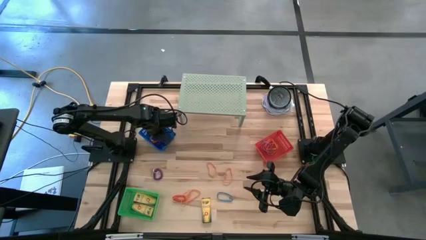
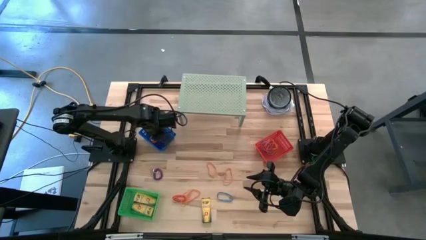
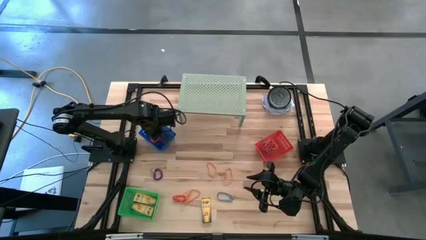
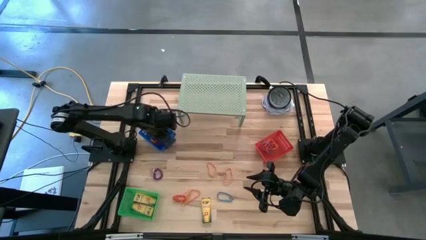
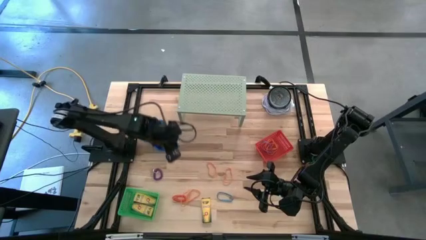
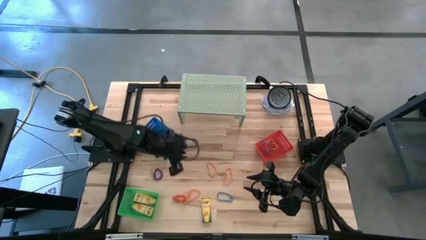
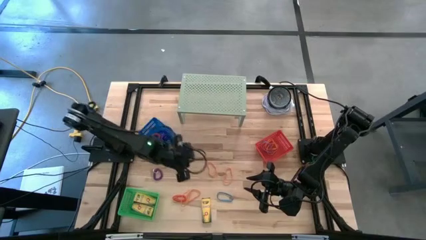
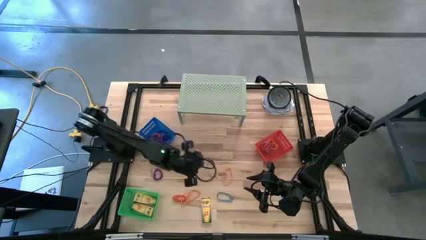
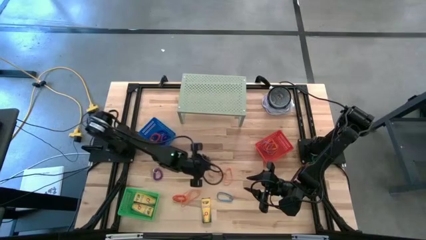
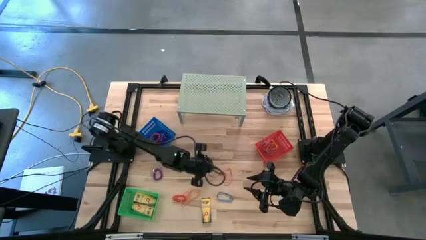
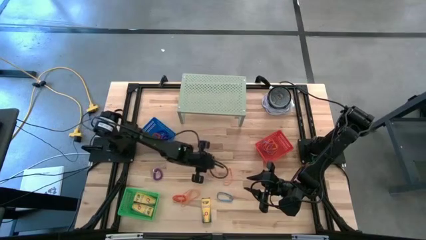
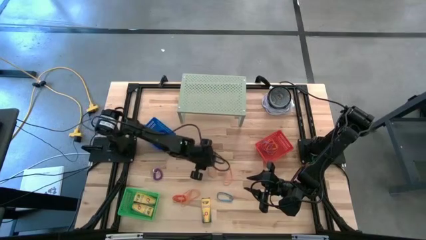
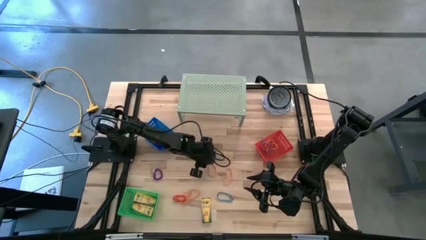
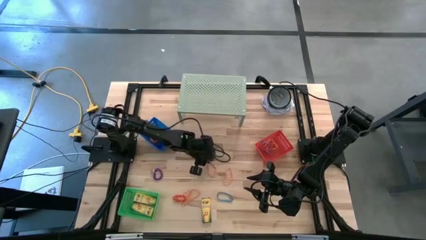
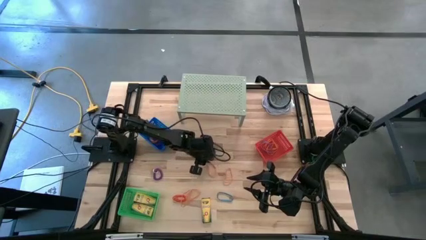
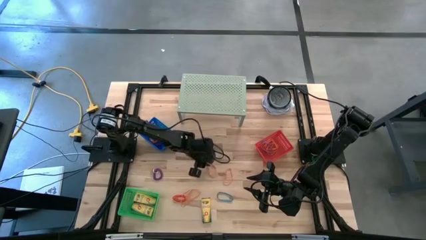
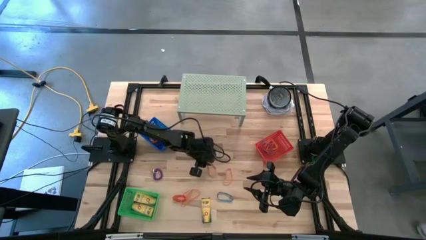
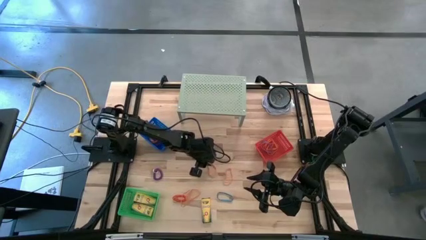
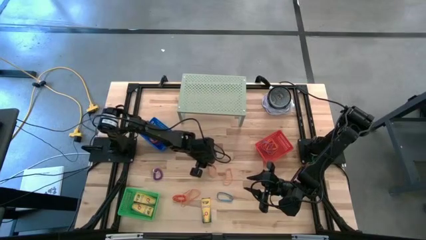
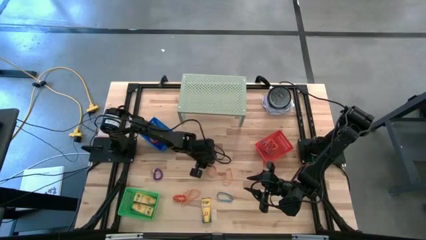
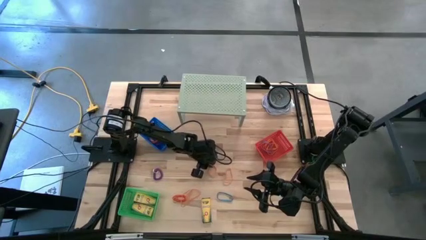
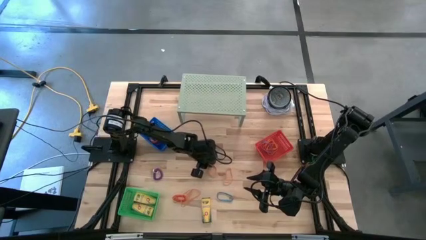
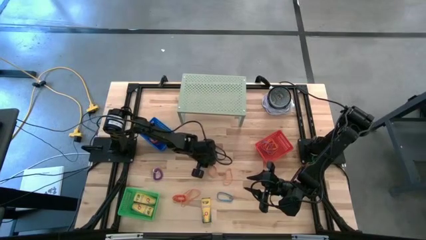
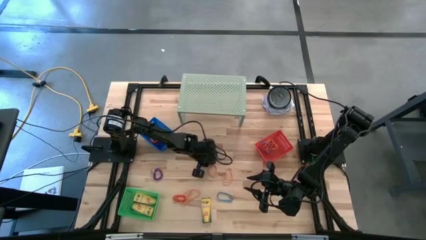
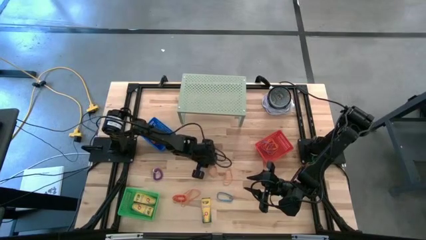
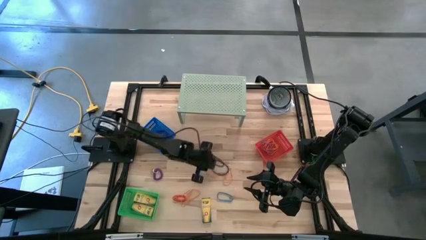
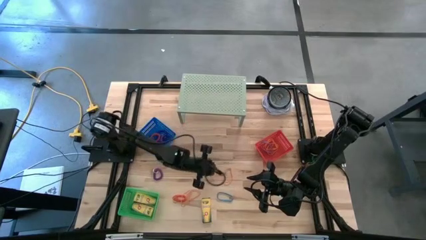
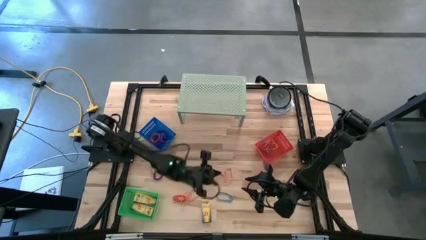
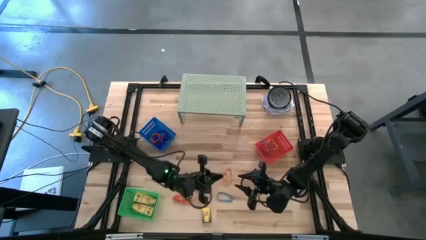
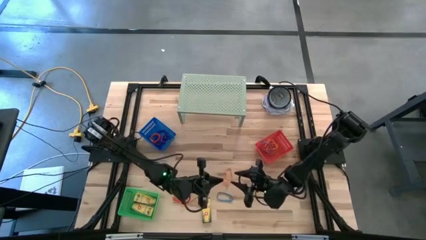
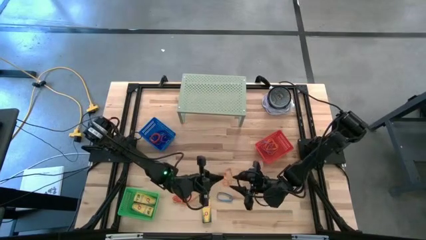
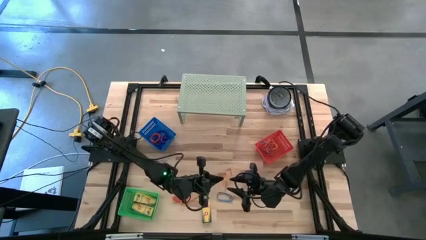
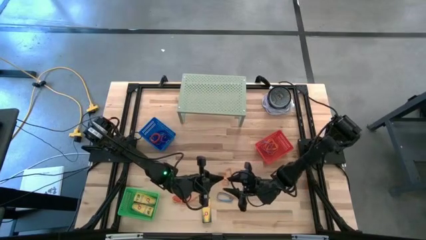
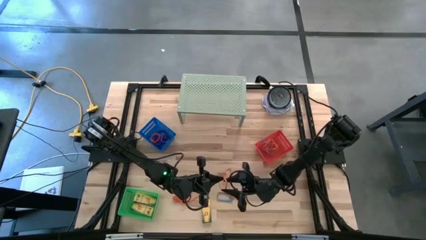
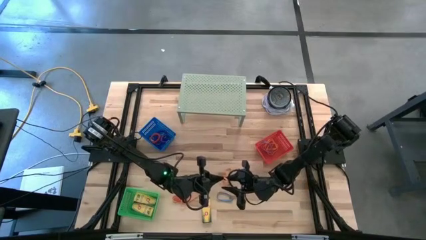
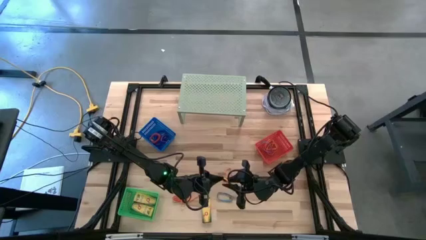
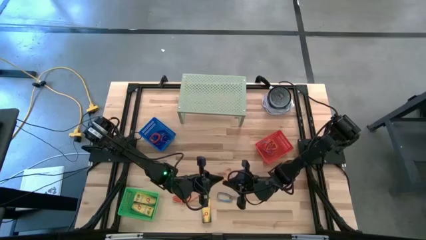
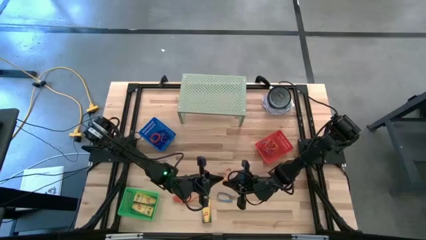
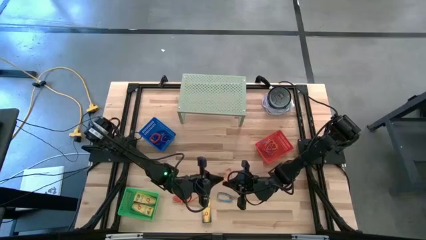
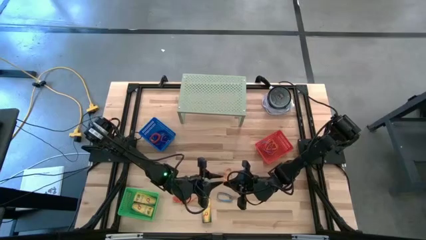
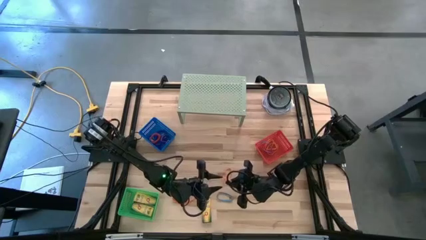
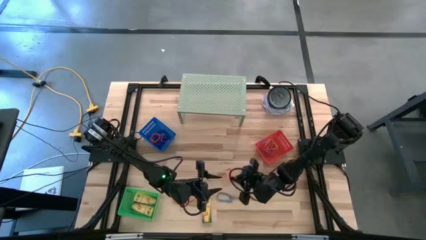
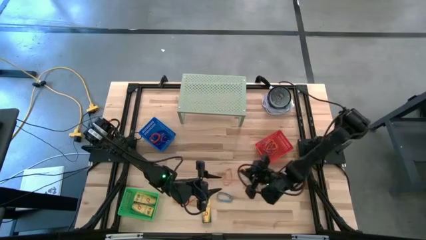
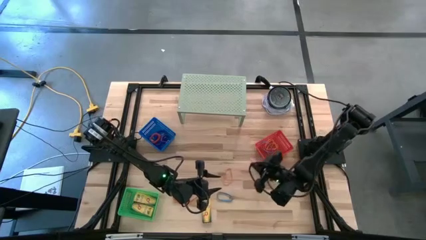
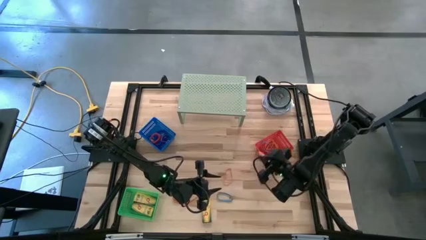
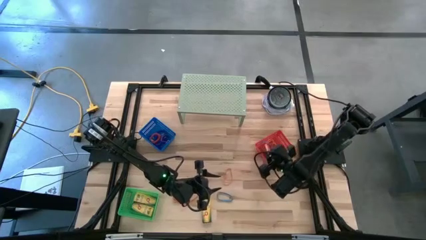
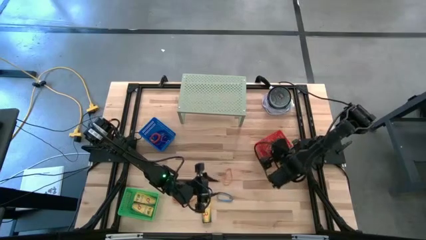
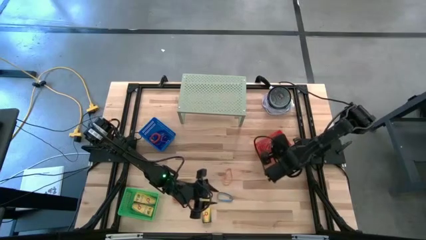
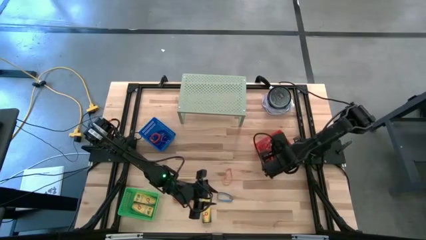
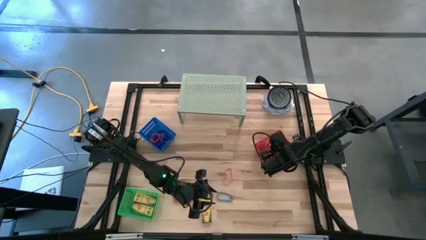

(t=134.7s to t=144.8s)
Task: Pick & Place Office Desk Supplies
Put the orange rubberband into the red bin

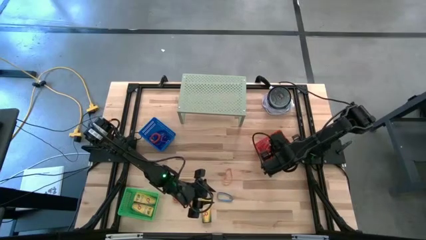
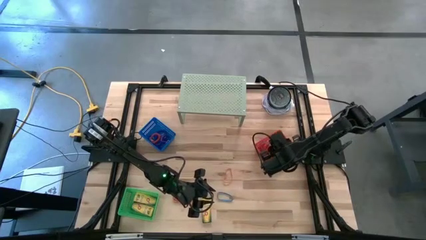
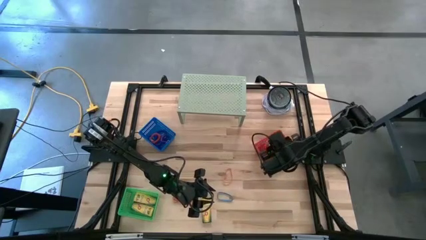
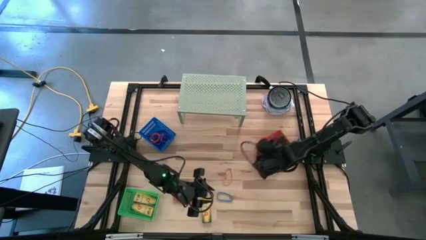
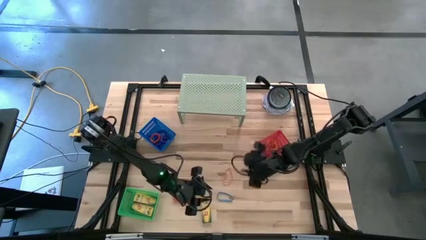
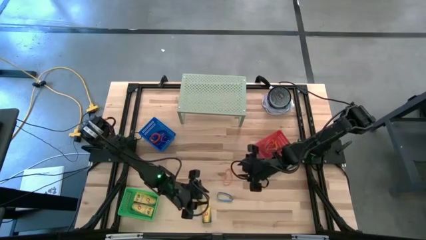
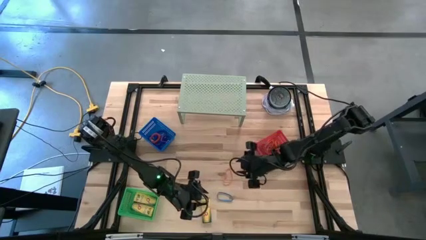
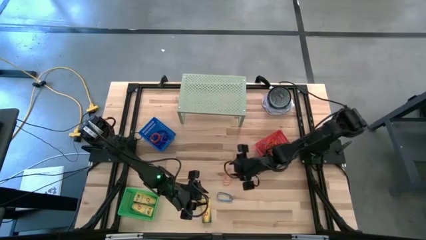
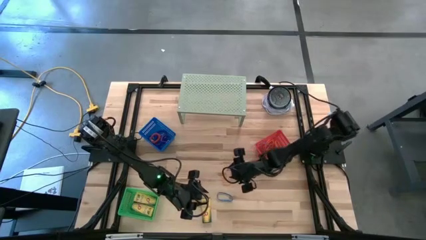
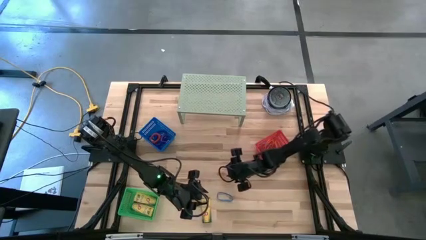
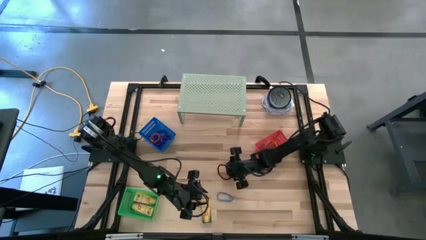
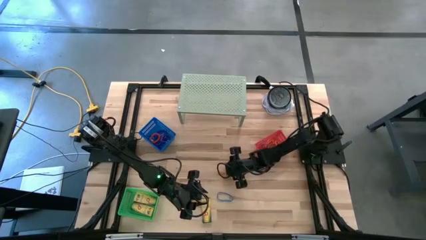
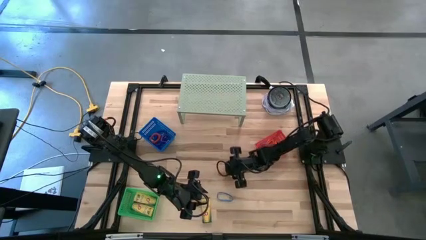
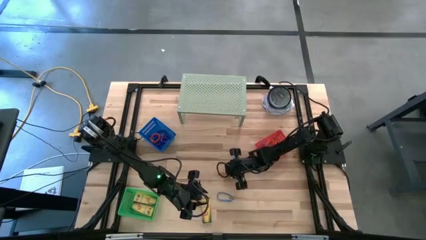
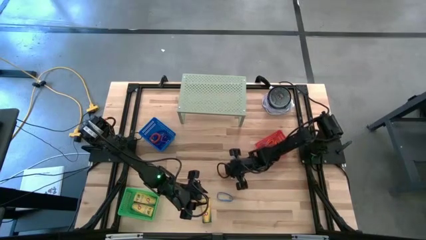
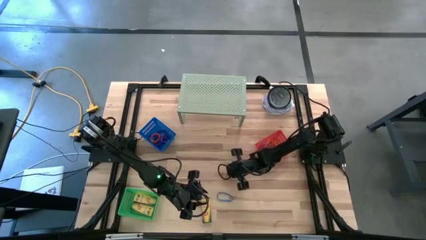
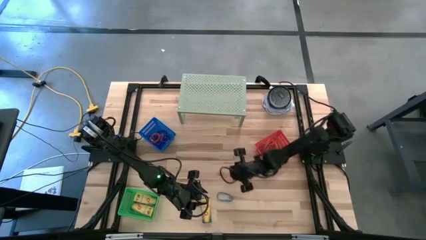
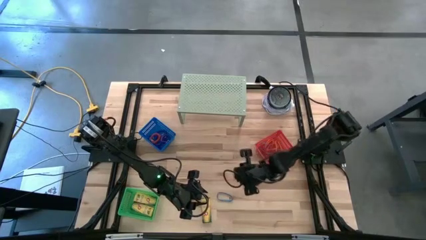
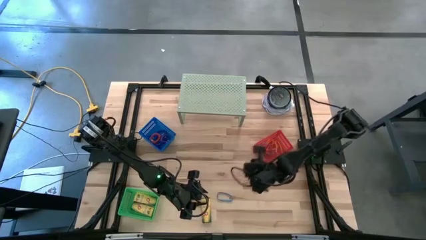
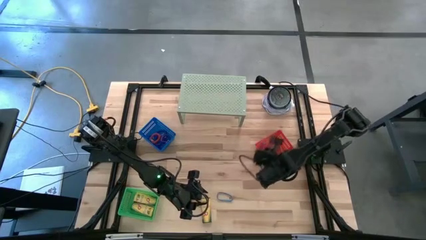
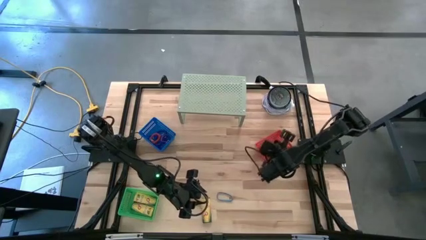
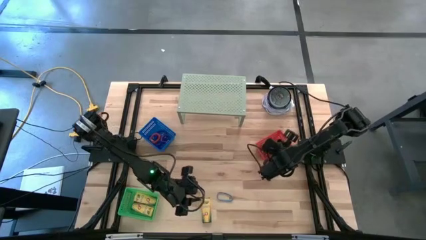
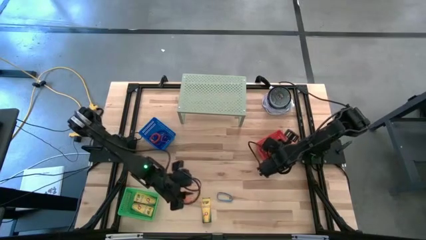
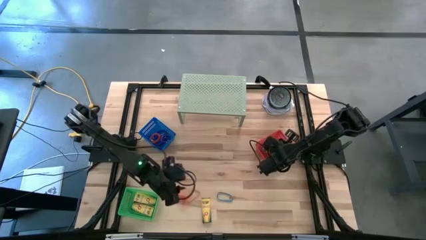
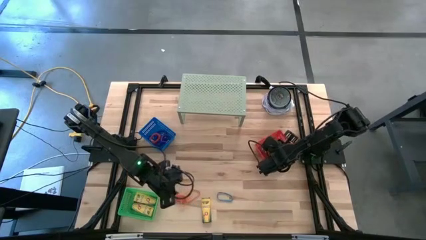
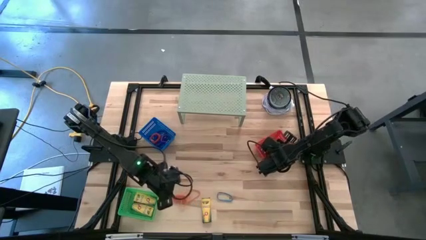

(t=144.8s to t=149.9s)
Put the orange rubberband into the red bin

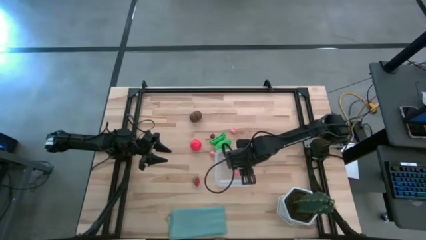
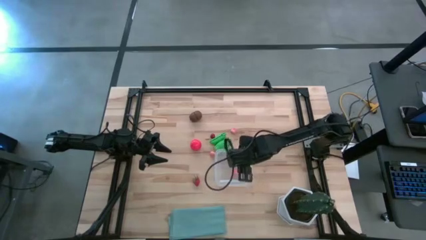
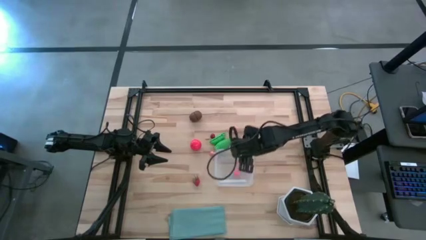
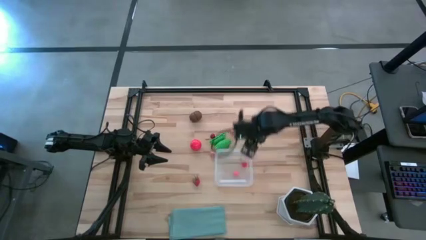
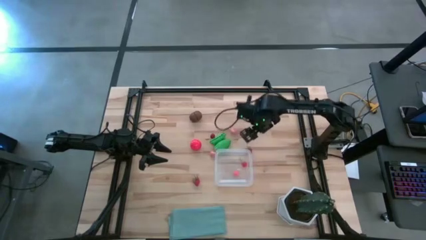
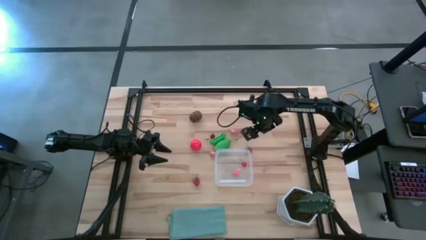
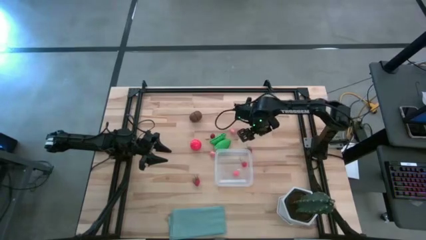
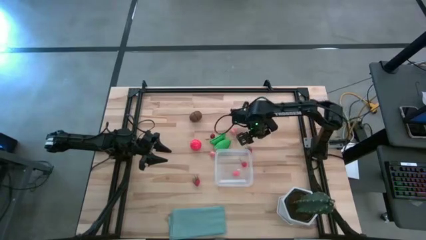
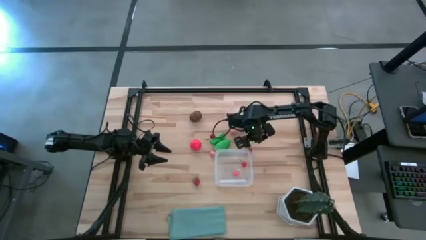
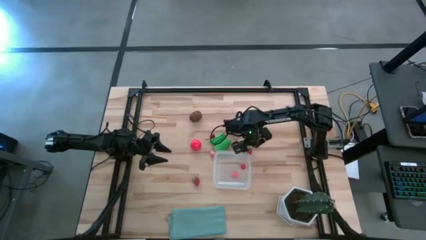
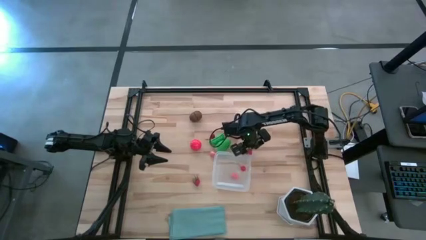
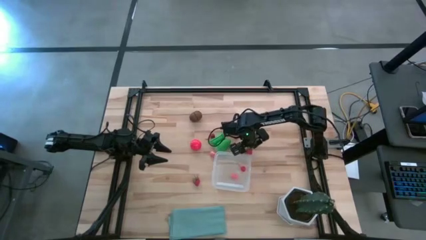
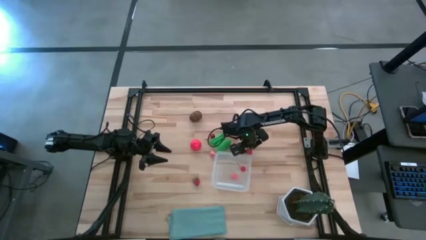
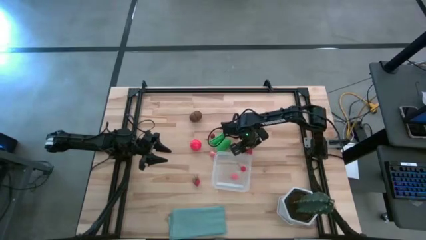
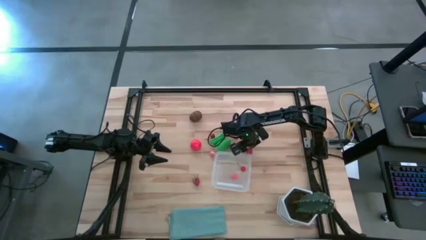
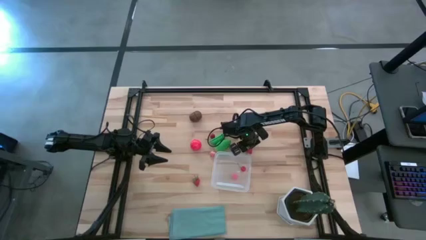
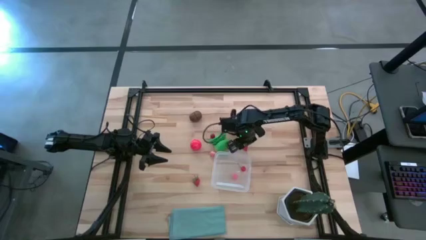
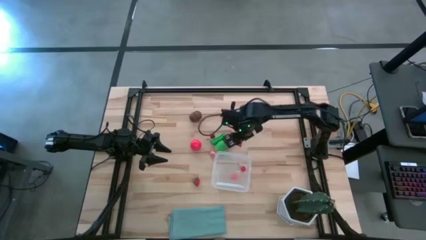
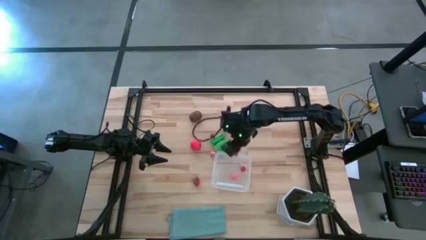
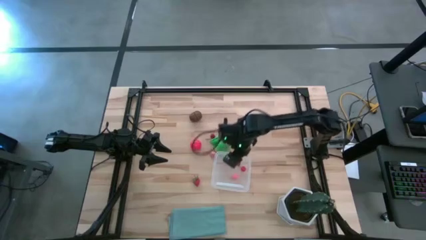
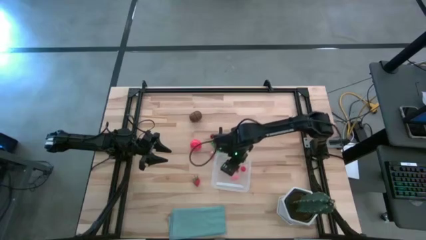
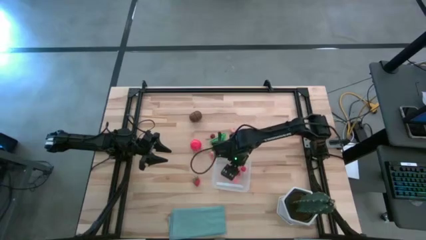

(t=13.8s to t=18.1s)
Task: Pick and placing Produce into tupperware
Put the top strawberry into the transparent container
